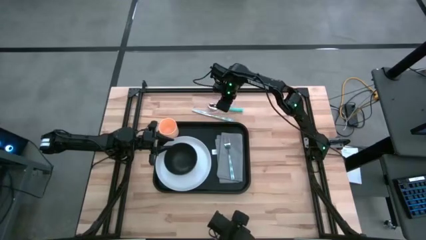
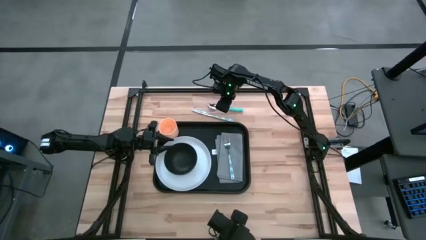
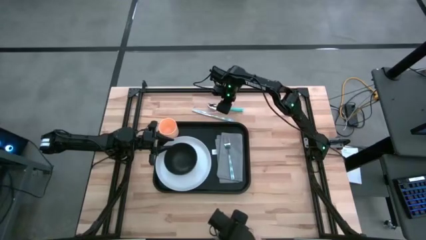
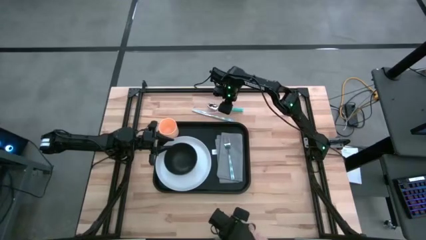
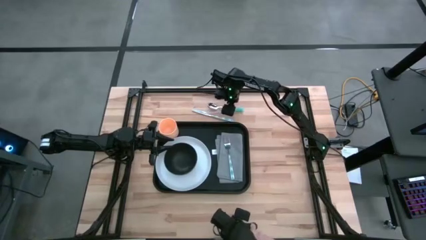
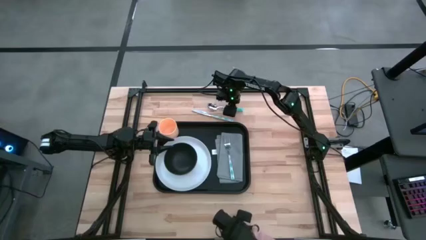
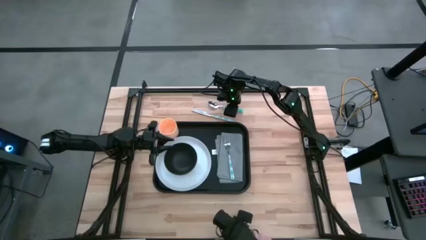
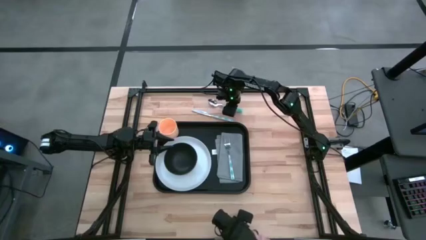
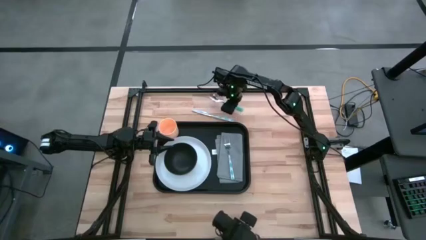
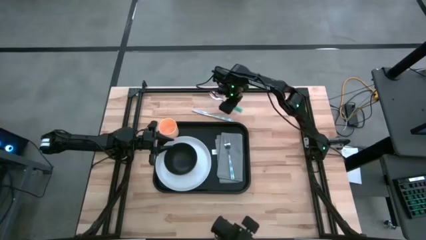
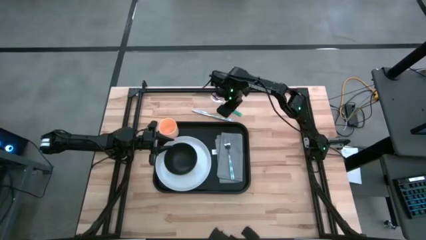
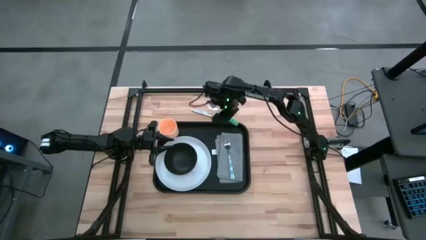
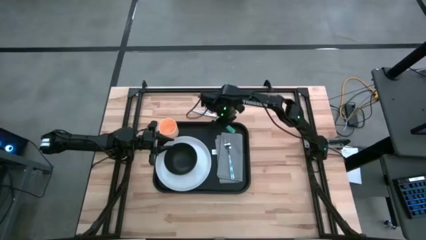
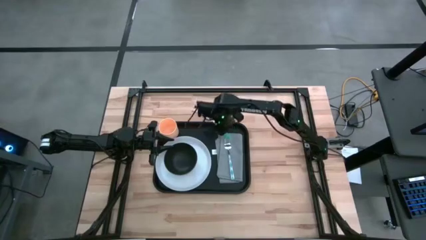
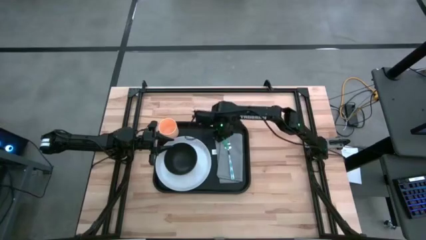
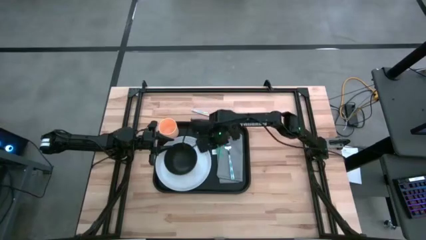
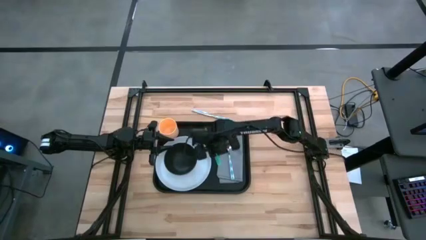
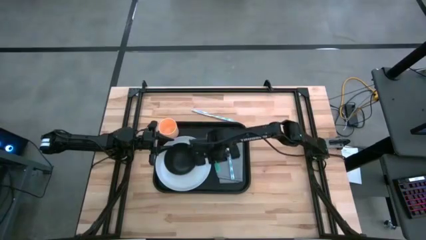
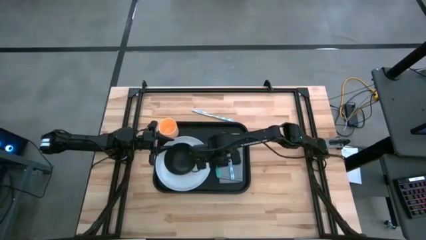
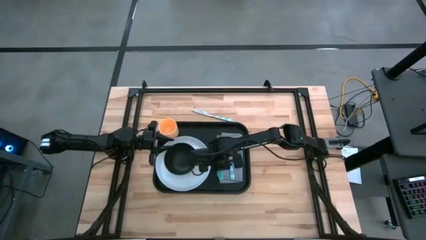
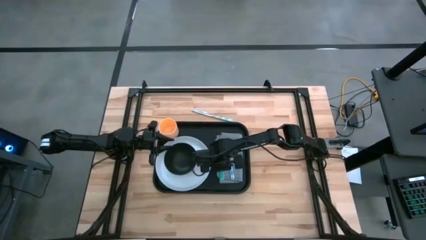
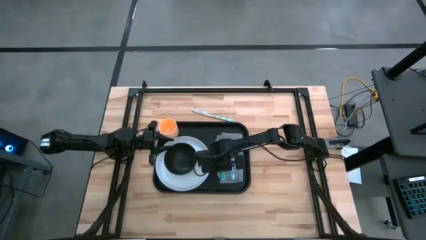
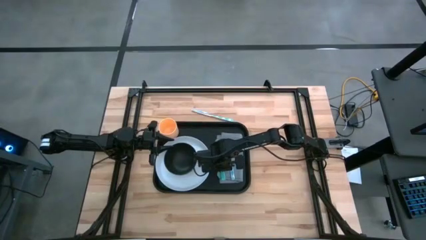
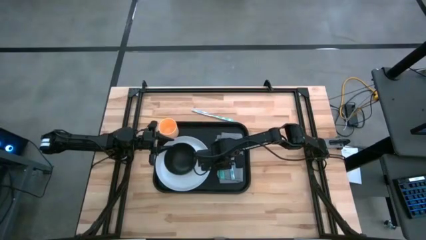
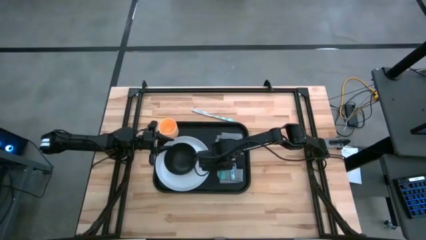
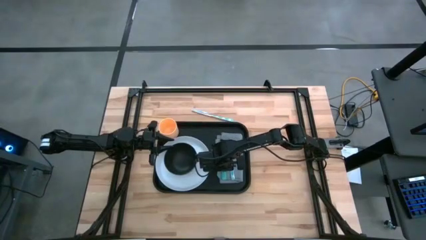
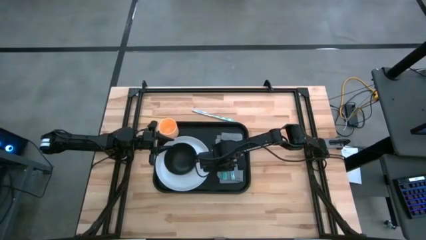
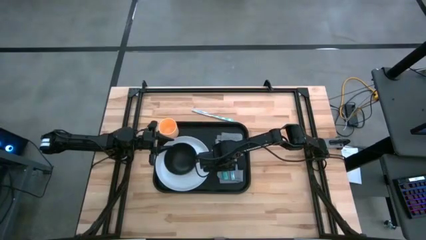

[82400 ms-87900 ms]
Task: Set up tray
Put the blue spoon on top of the gray napkin beside the blue fork on the black serving tray

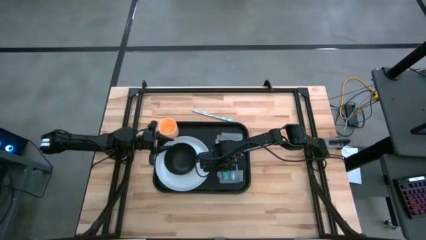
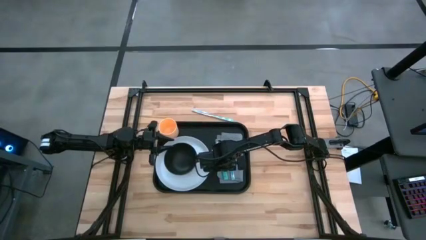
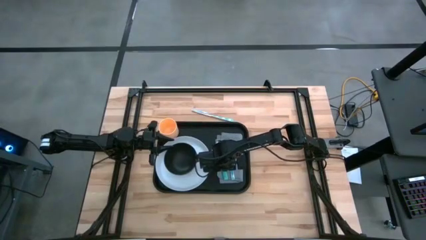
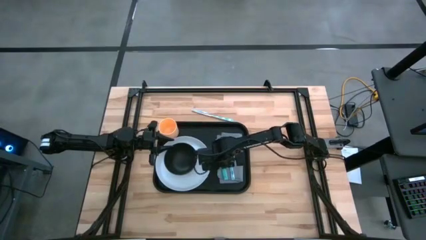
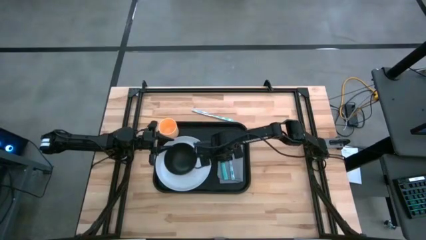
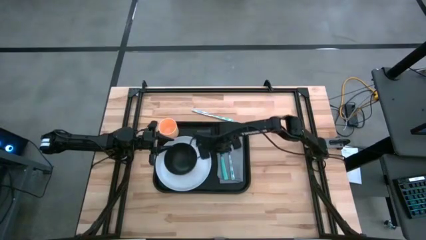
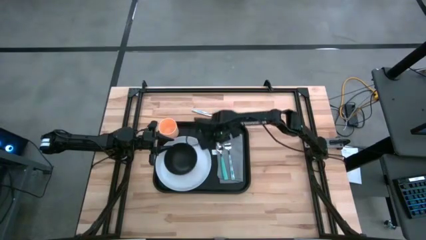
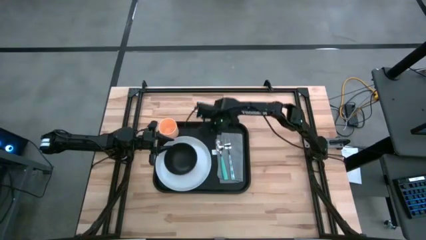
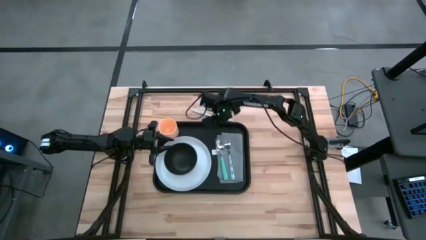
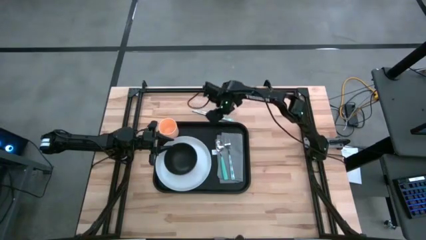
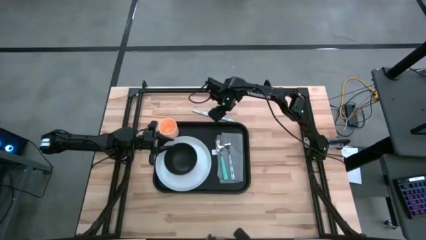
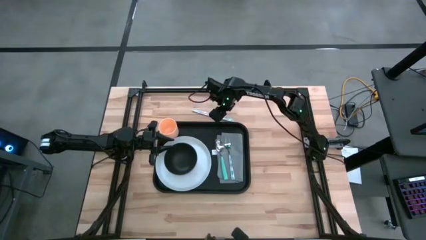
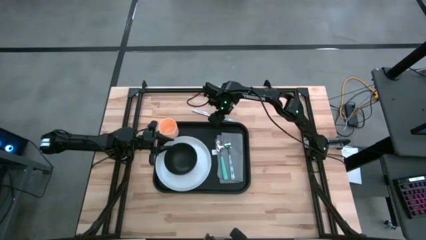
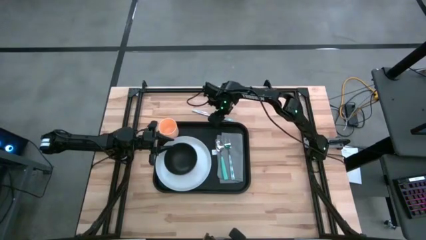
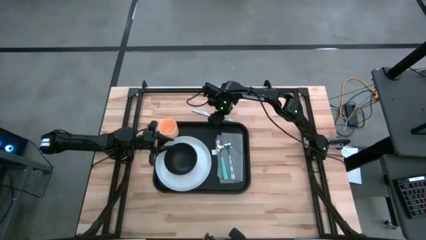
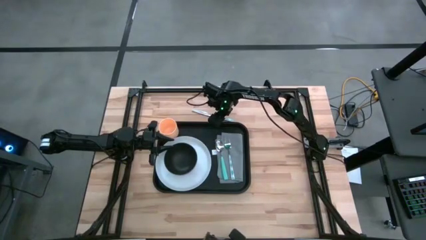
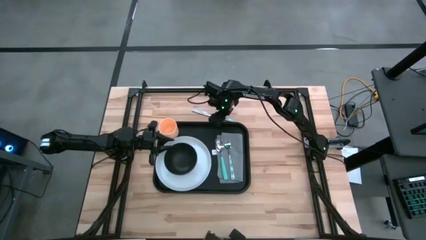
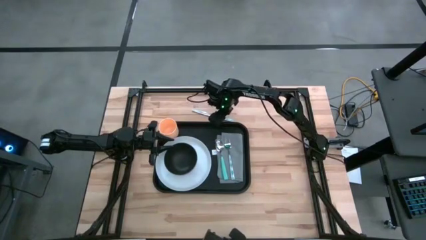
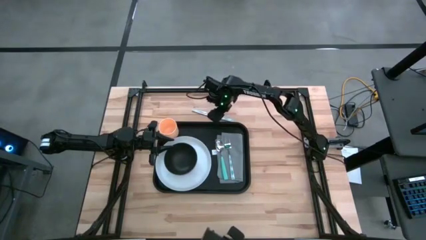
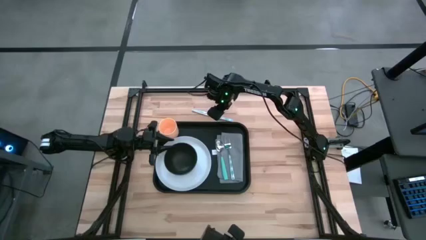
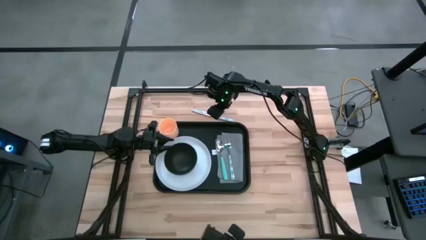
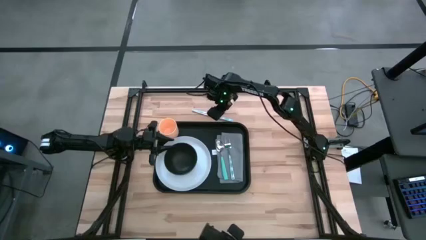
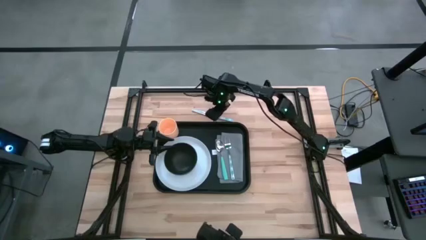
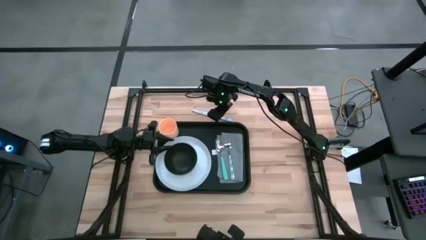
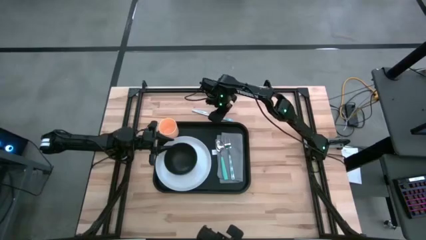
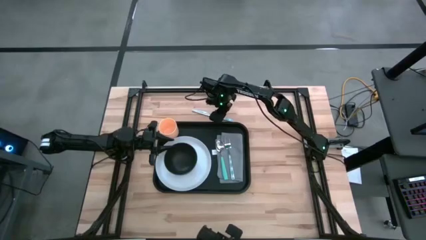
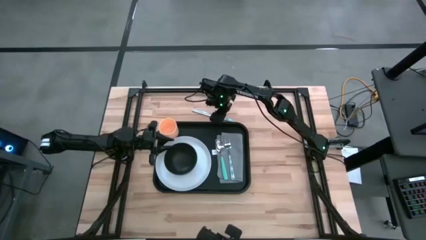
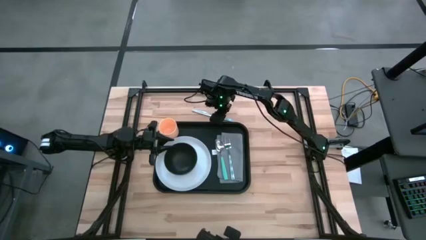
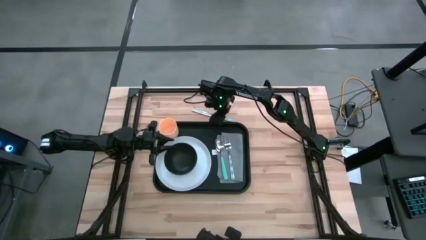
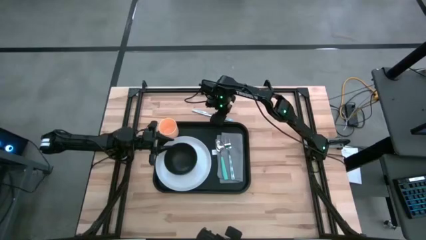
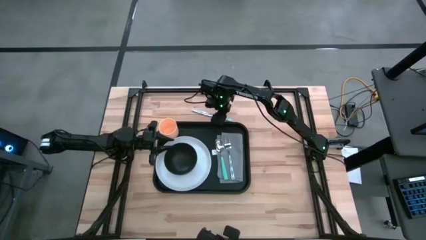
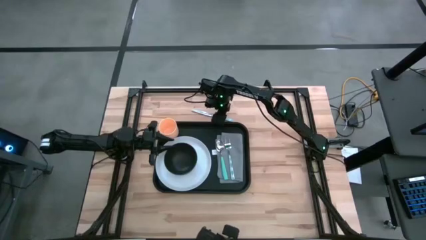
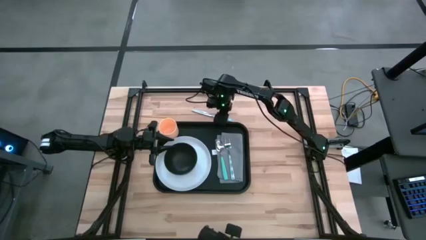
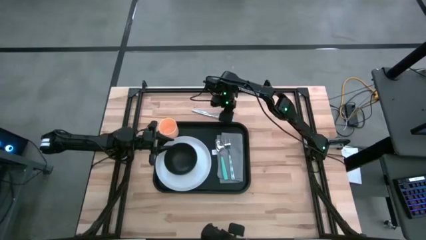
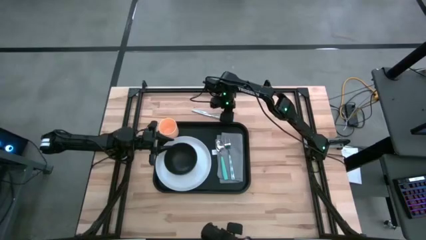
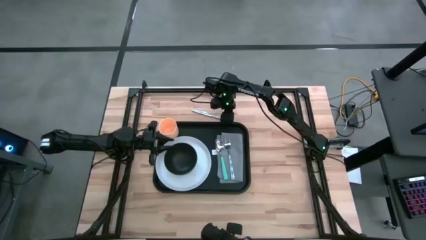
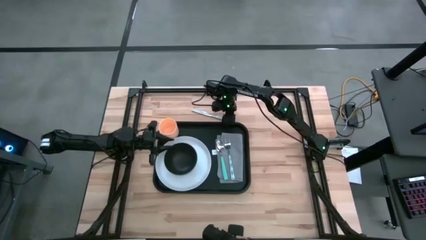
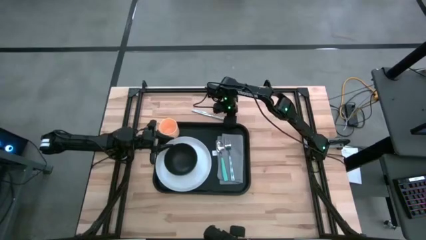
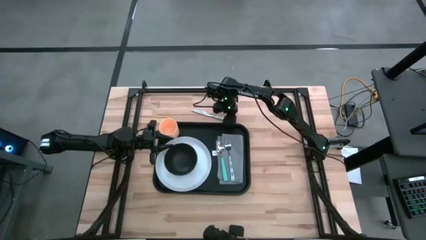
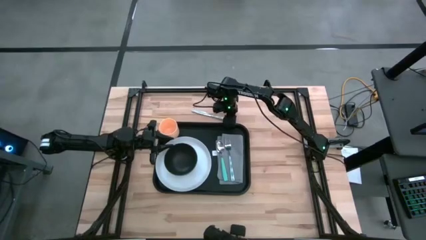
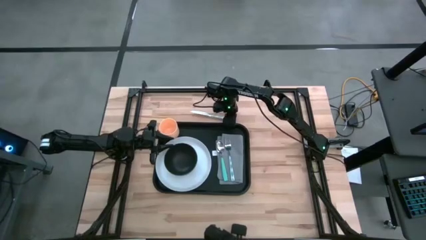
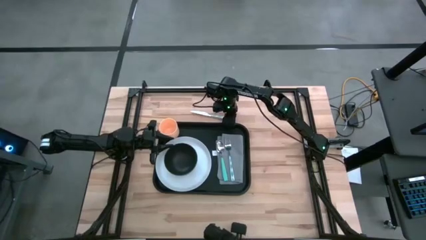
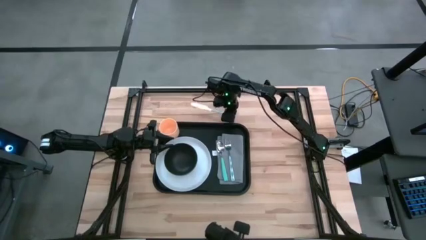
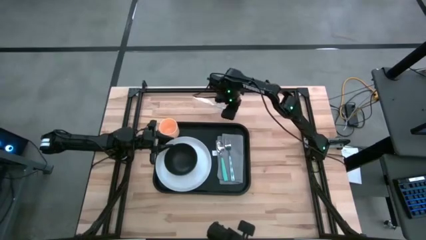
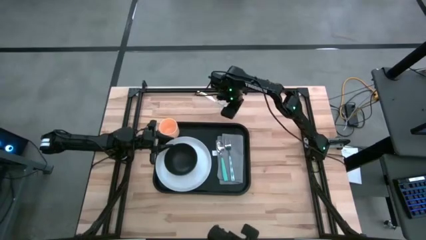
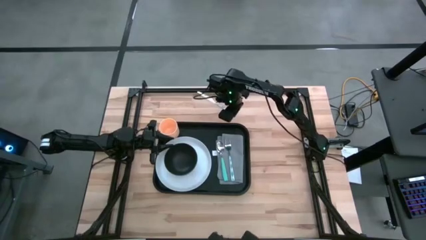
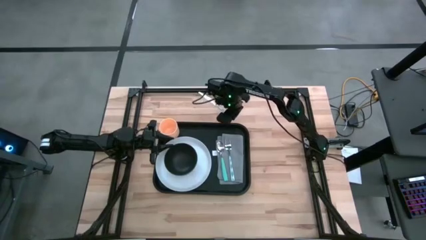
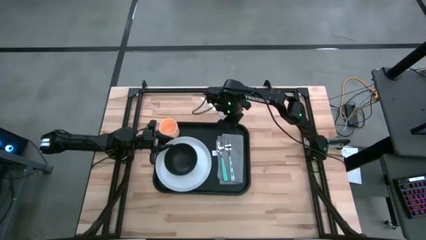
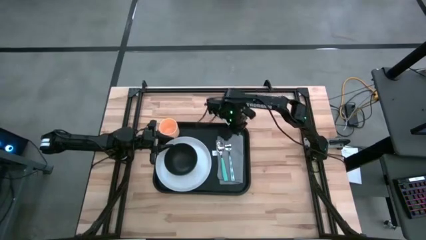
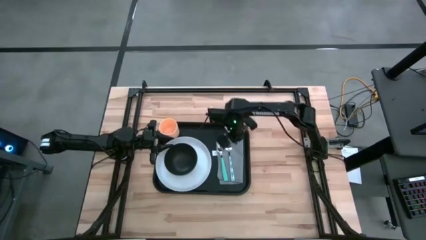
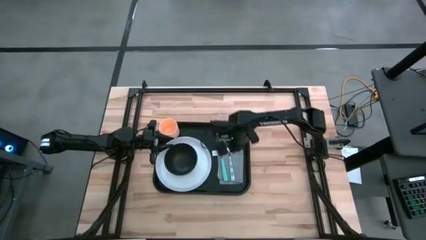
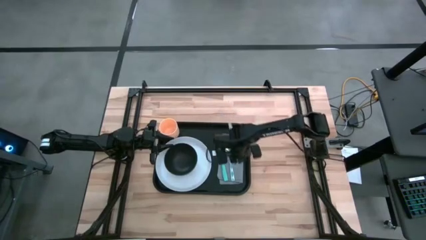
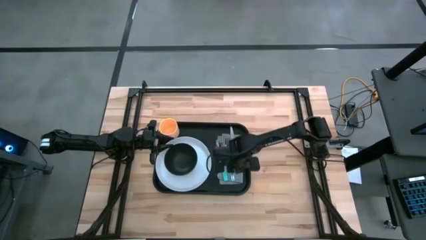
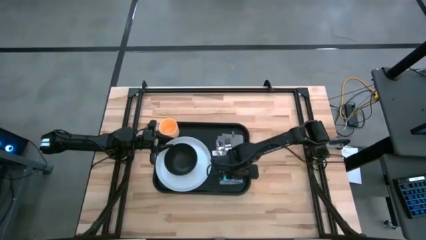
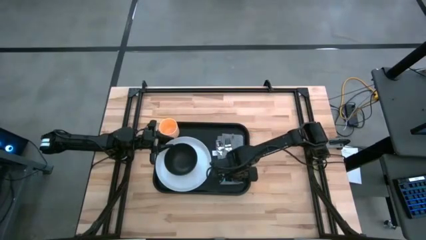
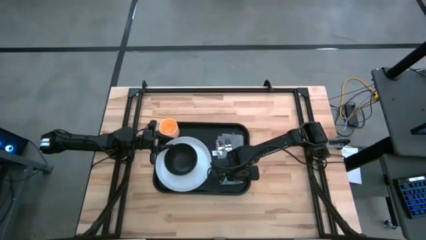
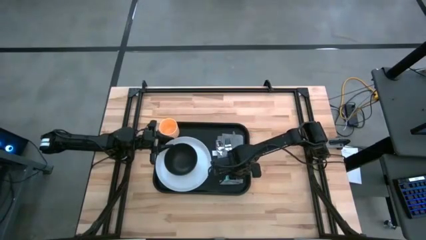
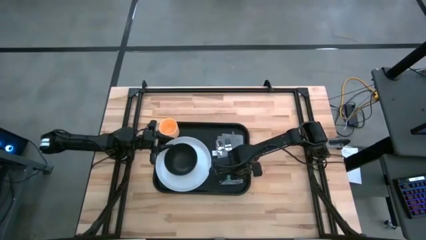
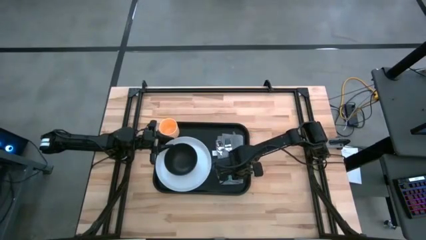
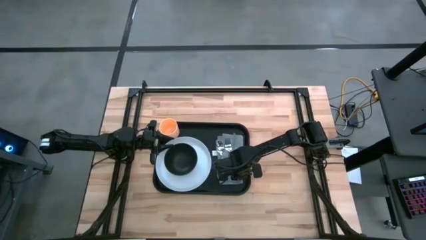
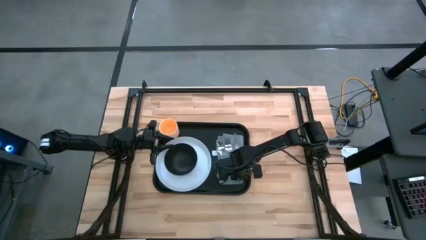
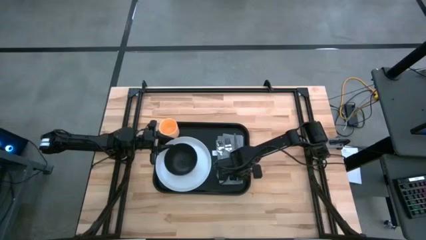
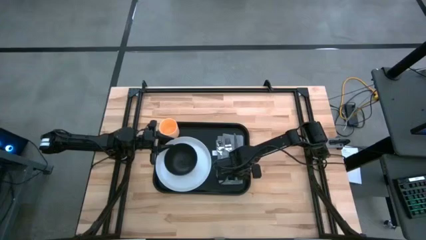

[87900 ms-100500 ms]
Put the blue knife on top of the gray napkin beside the blue fork on the black serving tray
